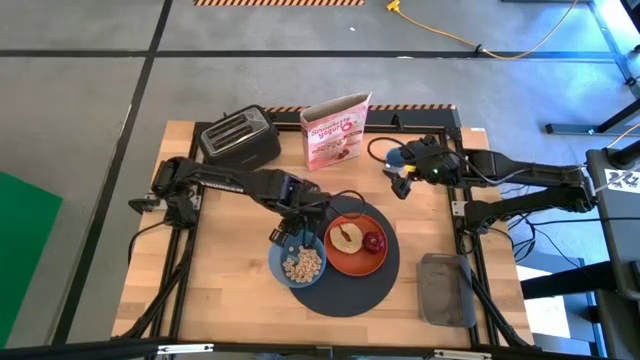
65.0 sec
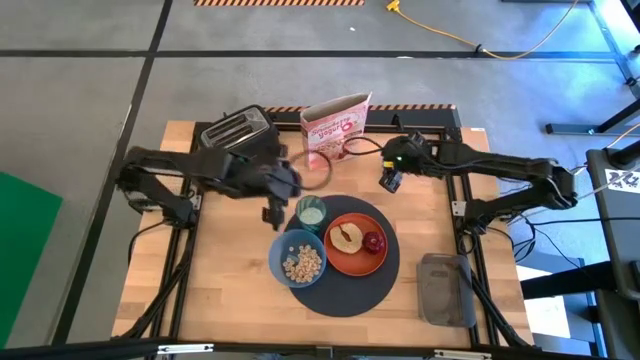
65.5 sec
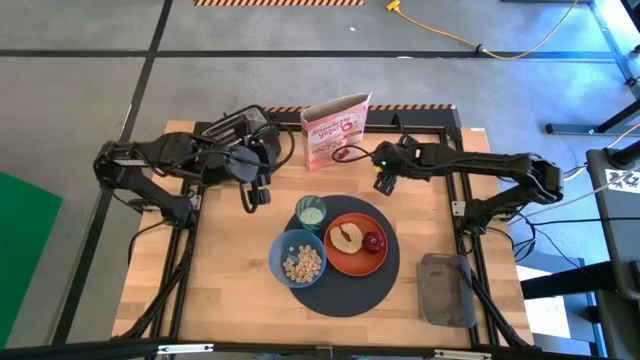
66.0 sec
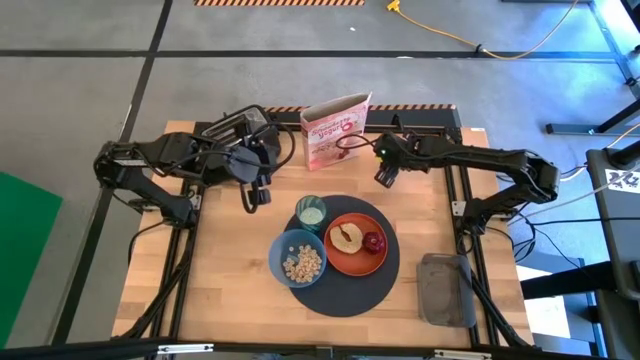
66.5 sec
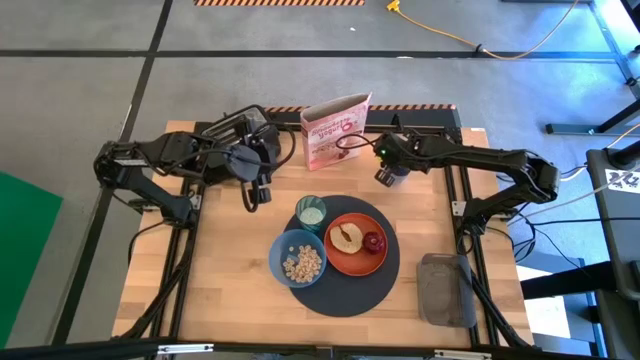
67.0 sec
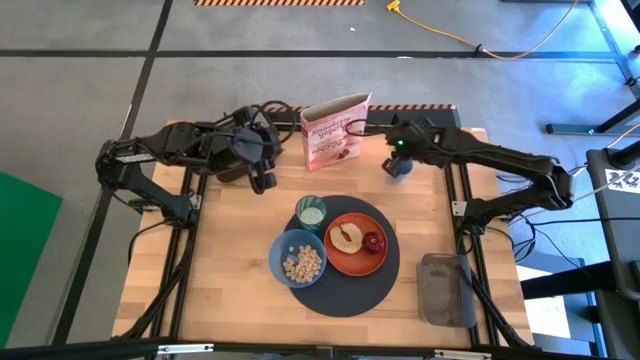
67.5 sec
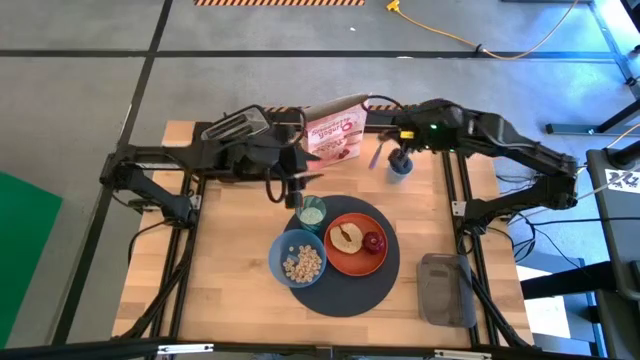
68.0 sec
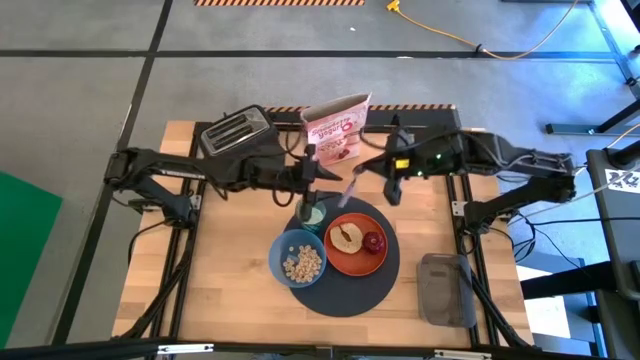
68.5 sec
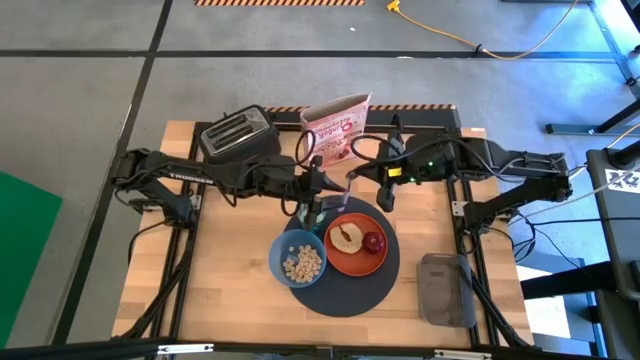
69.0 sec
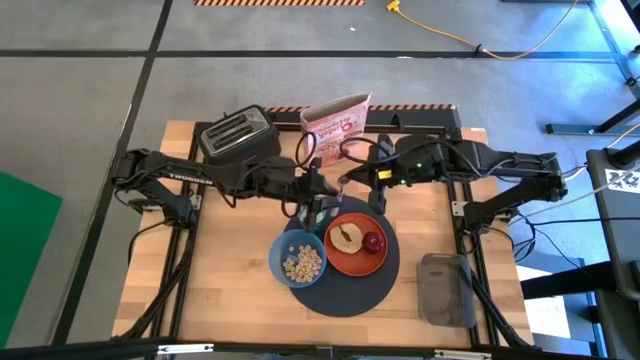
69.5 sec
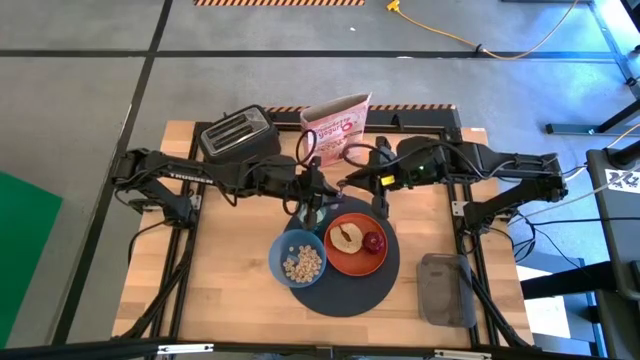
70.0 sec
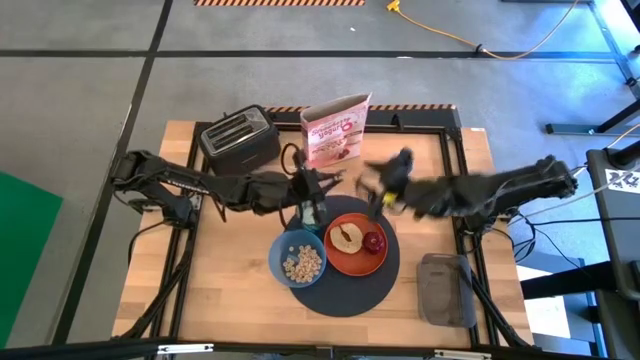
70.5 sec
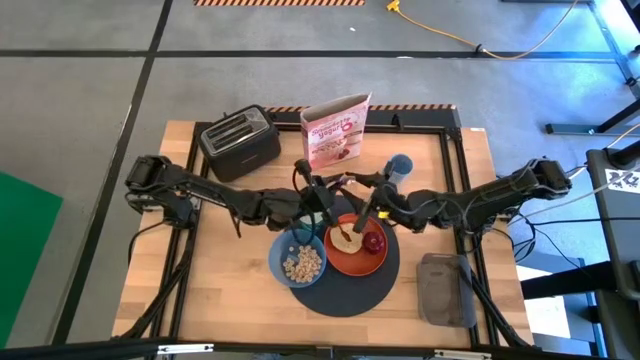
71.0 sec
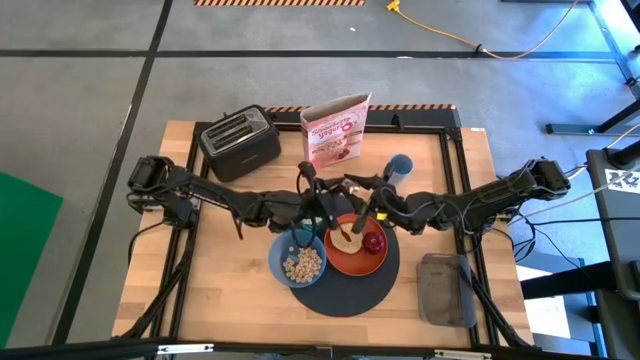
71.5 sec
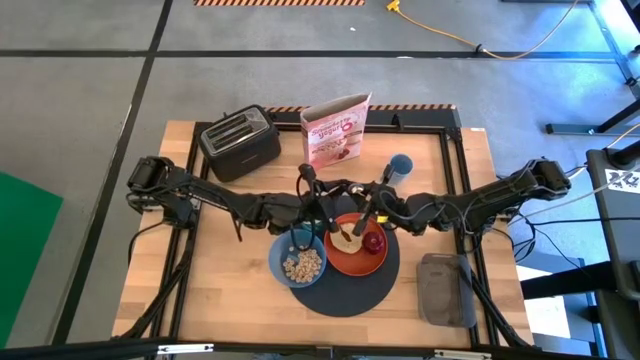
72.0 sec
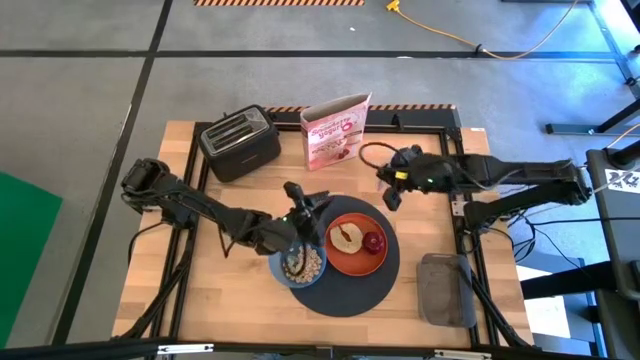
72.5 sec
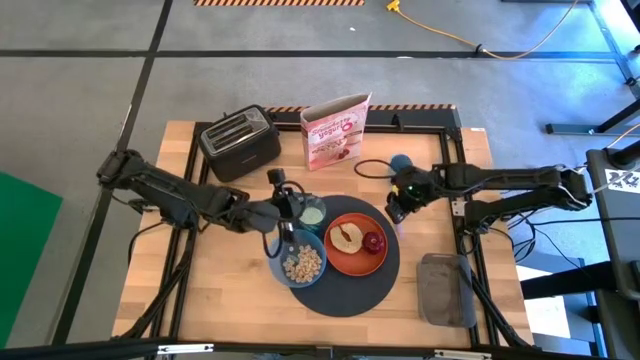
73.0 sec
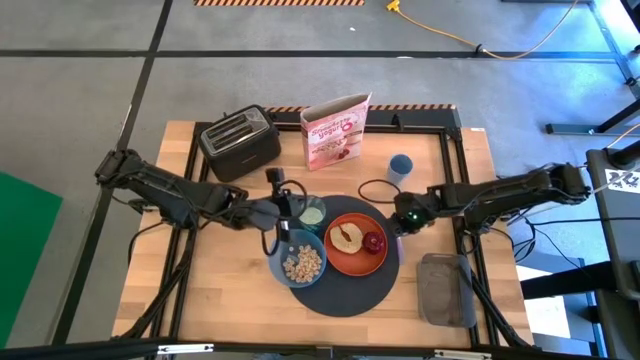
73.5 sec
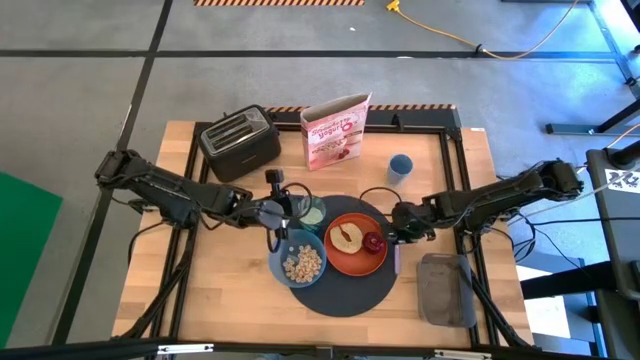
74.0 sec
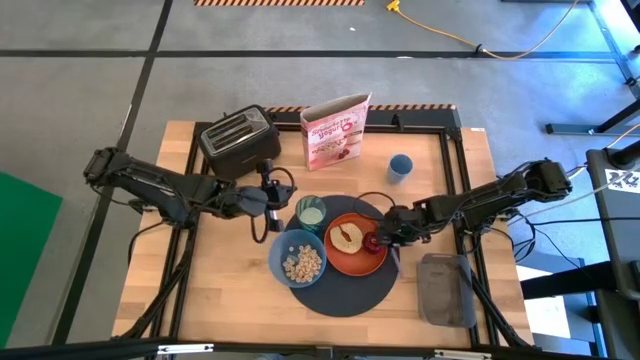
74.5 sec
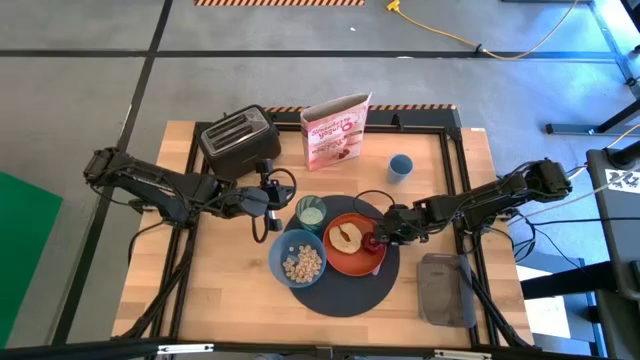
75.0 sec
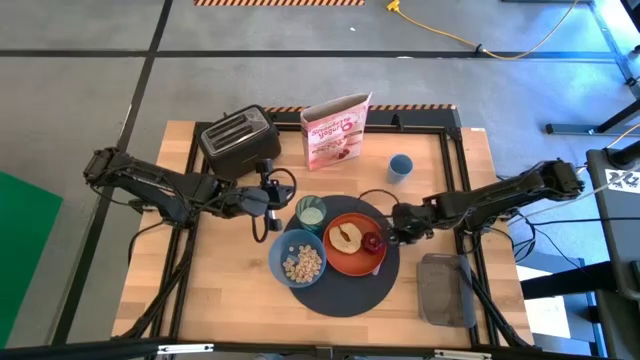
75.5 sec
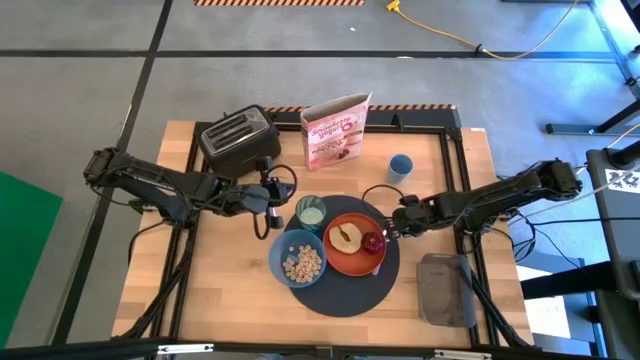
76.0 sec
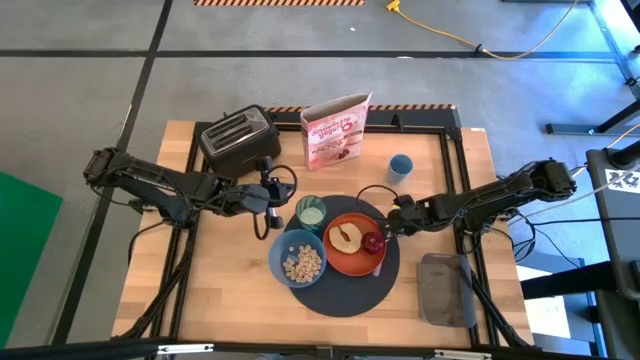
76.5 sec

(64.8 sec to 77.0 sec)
Task: Arrange a breakfast setting
Put the spoon on the mat to the right of the plate

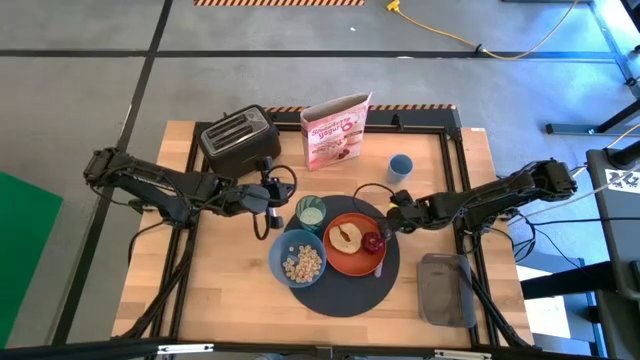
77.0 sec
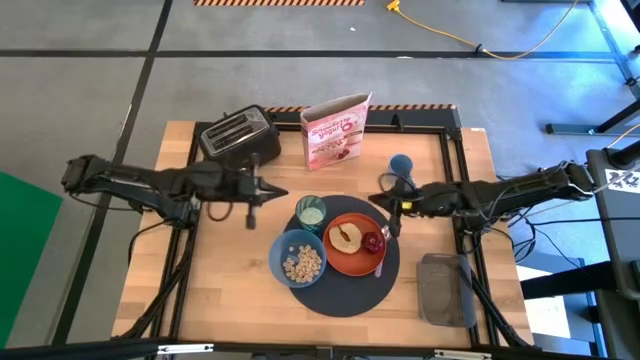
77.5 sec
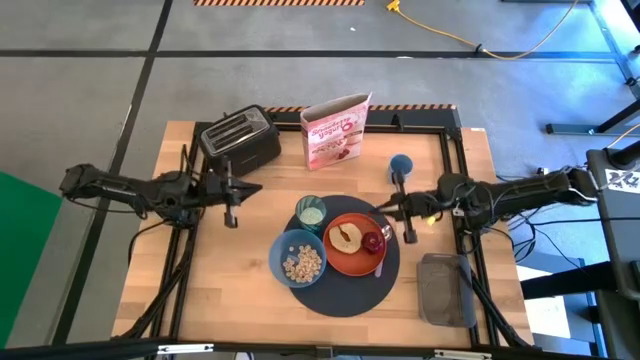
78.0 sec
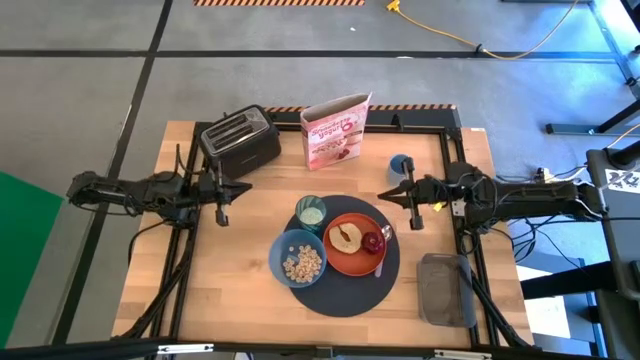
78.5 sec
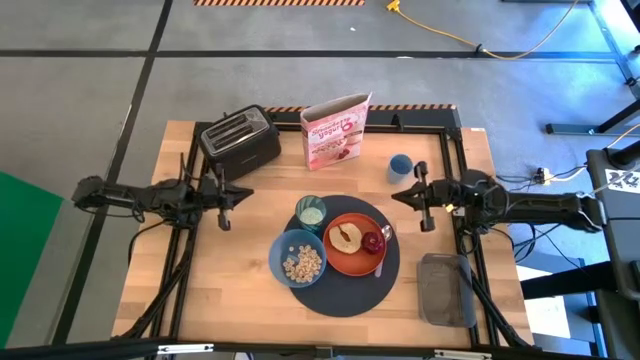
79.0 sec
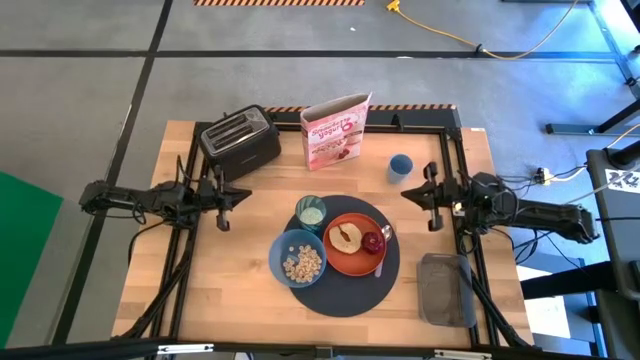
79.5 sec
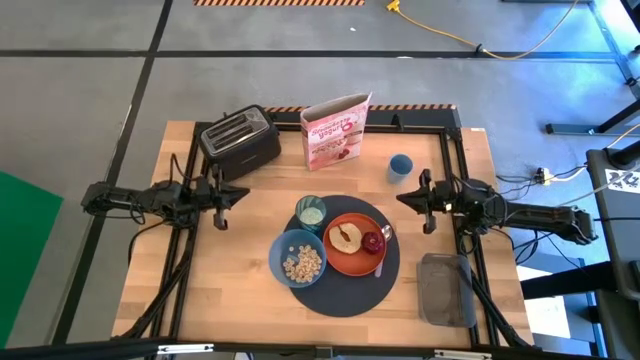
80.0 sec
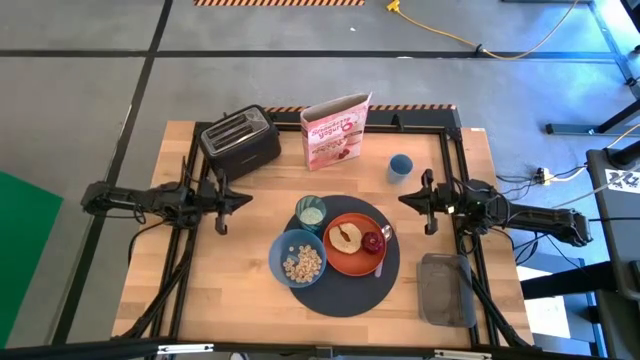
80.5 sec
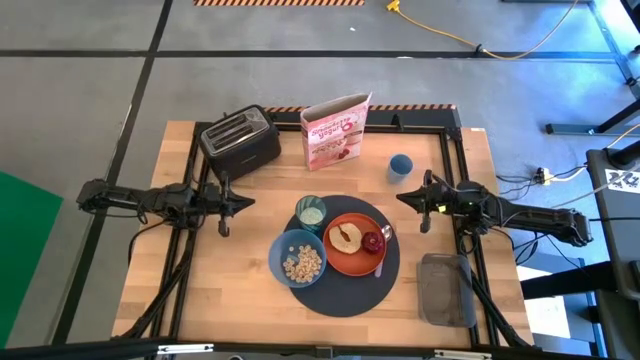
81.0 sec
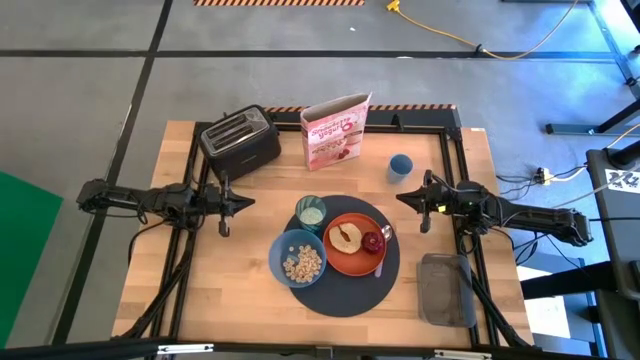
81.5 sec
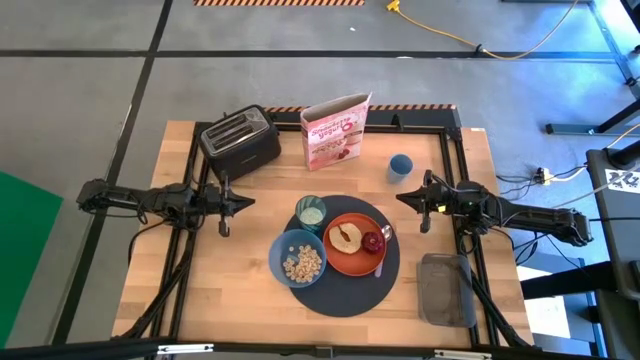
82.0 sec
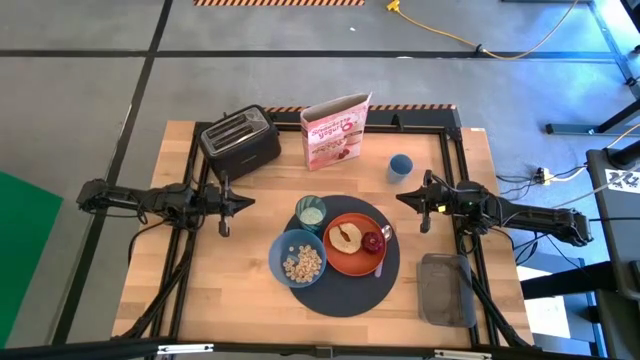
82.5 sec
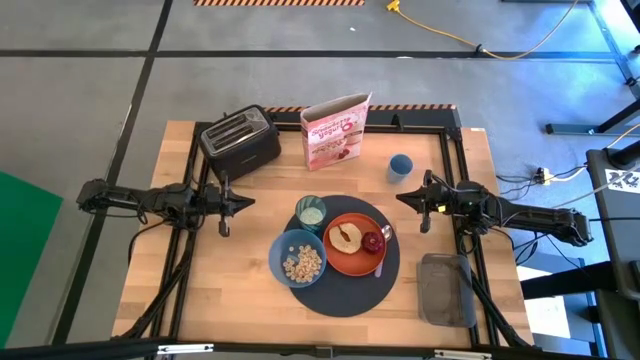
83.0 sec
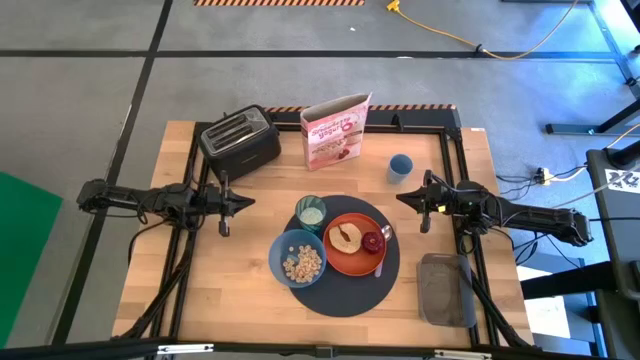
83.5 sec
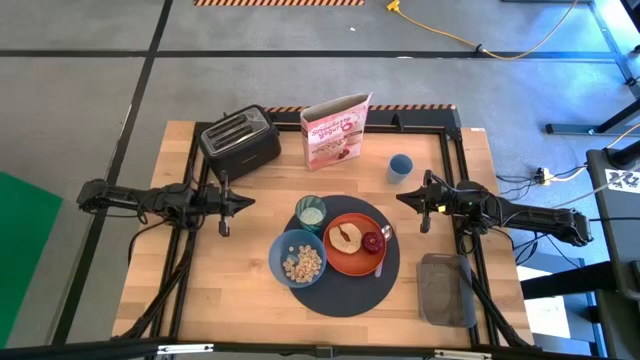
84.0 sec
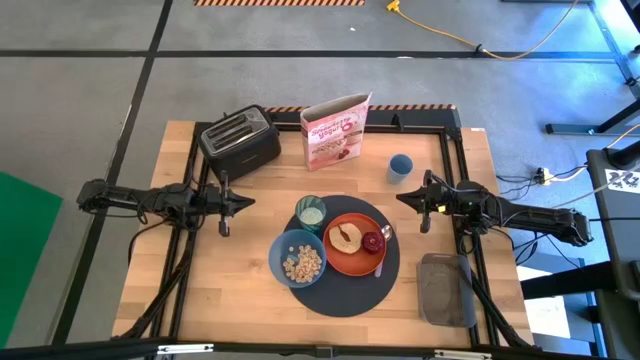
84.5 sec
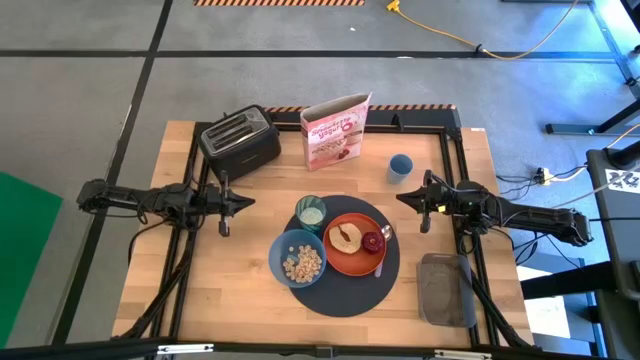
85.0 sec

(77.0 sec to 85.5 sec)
Return to Home Position
